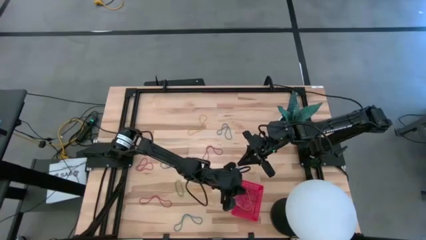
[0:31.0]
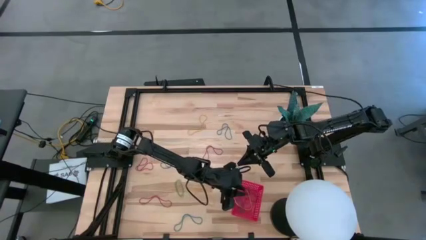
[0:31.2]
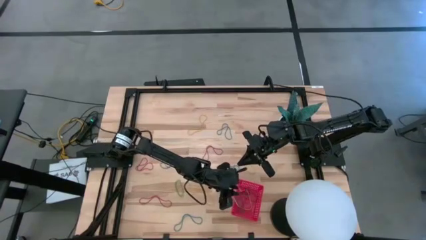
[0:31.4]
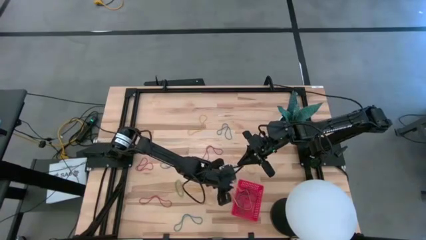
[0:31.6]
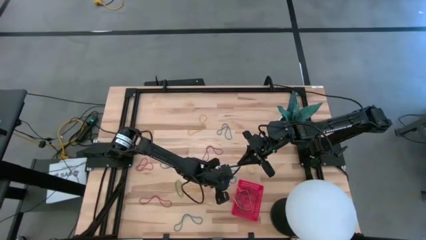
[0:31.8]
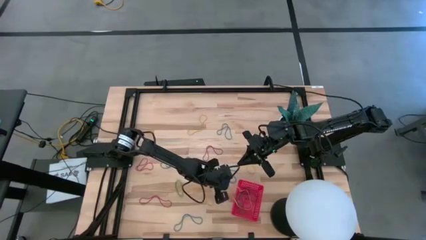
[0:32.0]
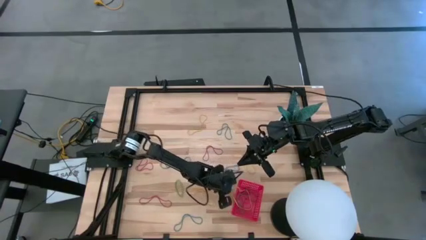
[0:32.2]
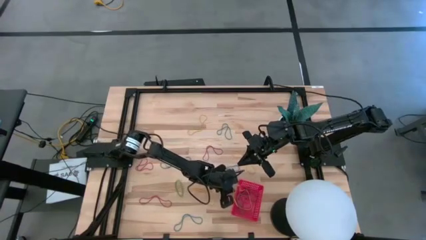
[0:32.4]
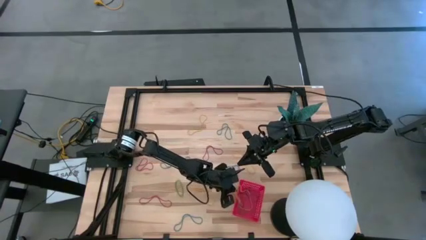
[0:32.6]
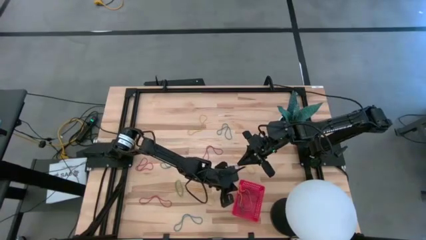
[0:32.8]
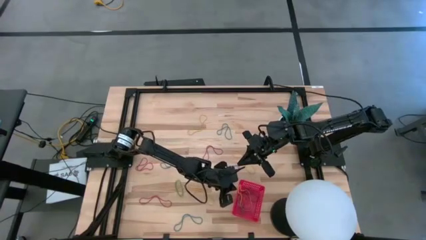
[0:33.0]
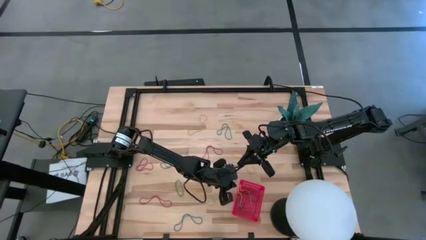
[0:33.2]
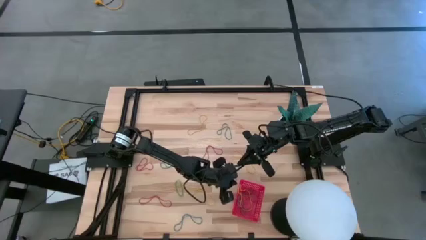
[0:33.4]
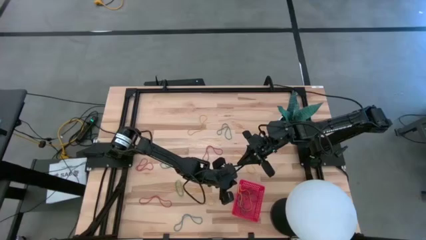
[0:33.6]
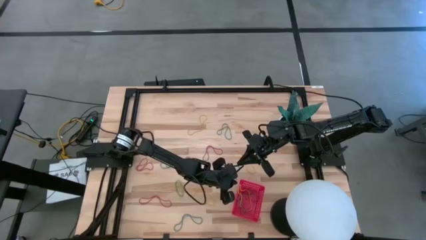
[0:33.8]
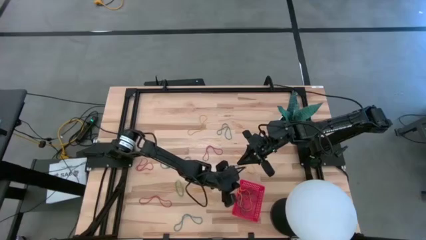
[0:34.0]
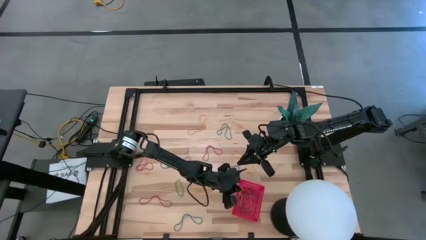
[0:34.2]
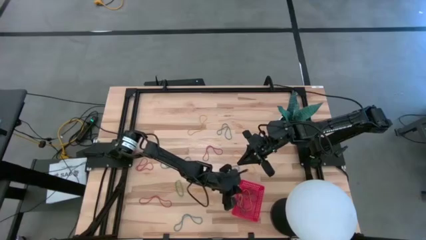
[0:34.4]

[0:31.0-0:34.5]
Task: Pick and place items into bin
Adjust the yellow rubber band in the red bin

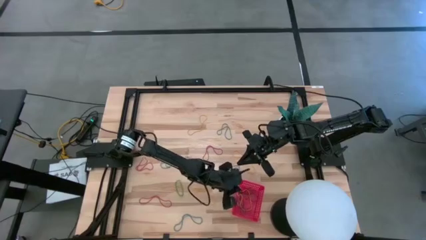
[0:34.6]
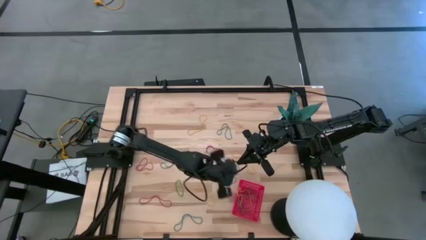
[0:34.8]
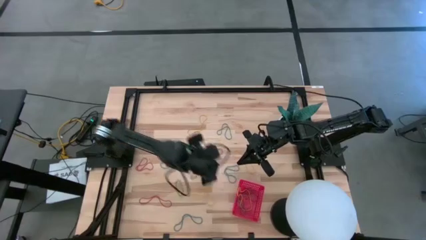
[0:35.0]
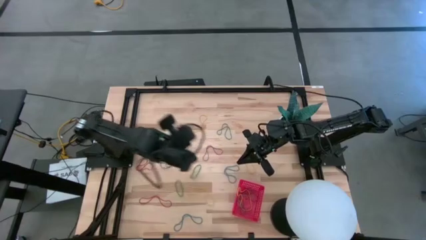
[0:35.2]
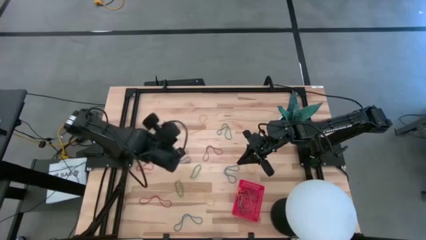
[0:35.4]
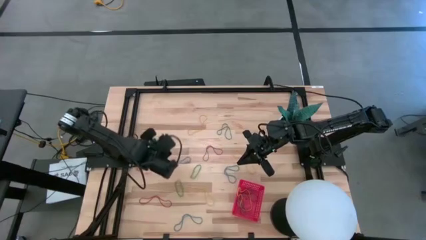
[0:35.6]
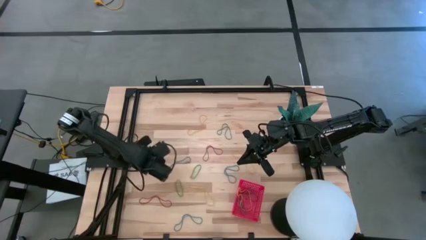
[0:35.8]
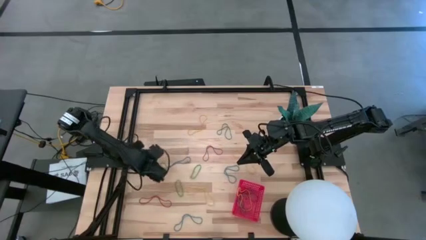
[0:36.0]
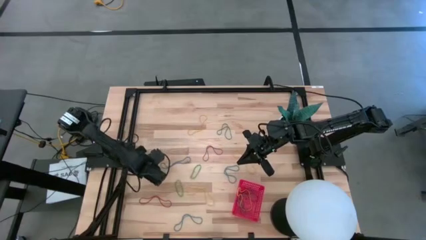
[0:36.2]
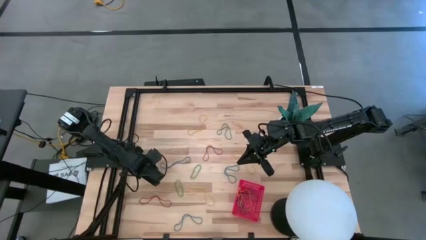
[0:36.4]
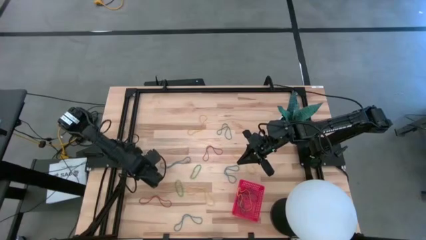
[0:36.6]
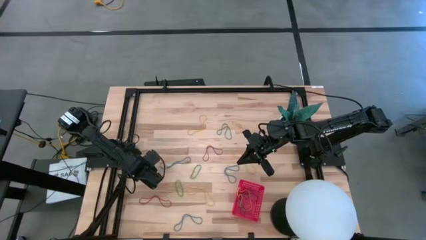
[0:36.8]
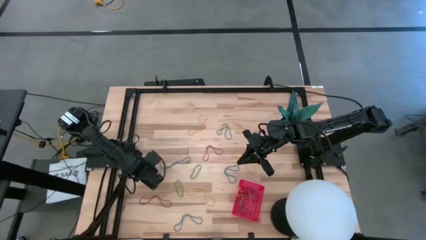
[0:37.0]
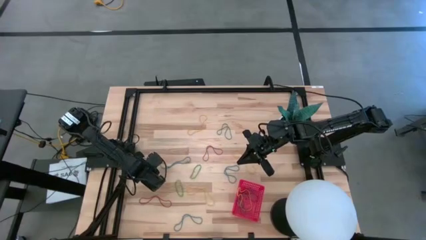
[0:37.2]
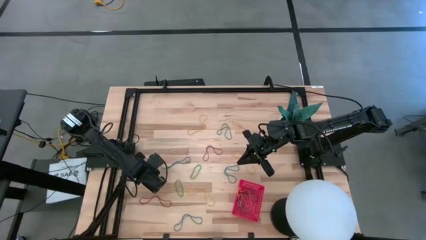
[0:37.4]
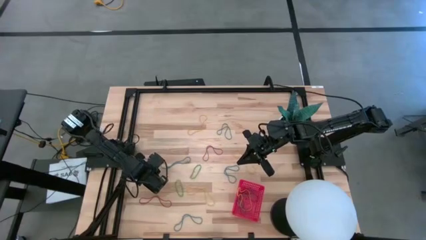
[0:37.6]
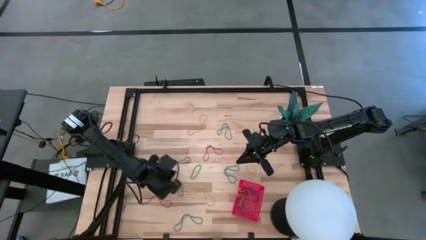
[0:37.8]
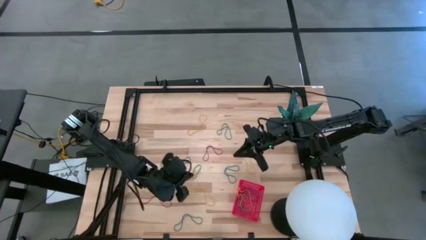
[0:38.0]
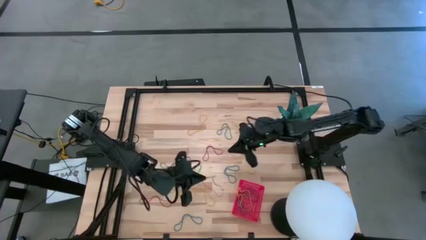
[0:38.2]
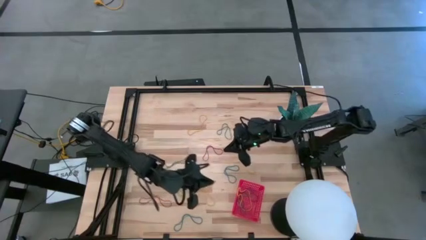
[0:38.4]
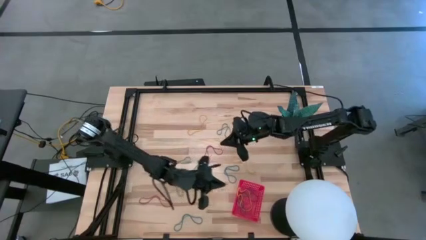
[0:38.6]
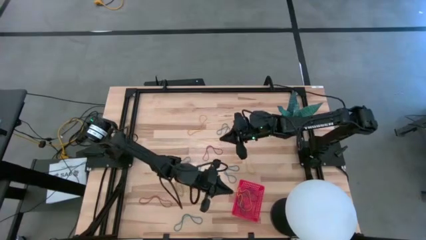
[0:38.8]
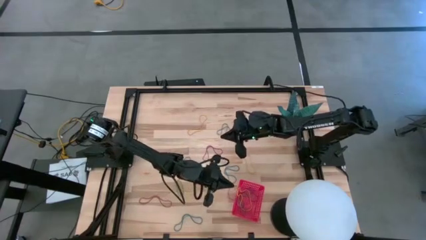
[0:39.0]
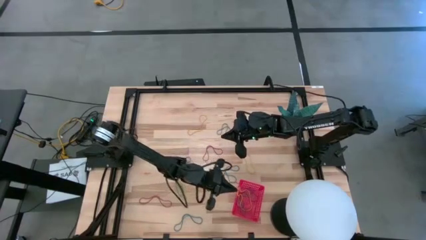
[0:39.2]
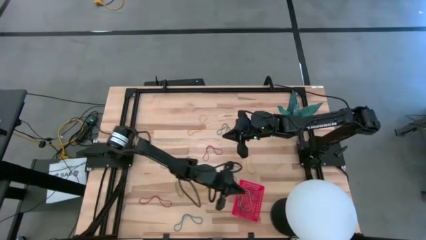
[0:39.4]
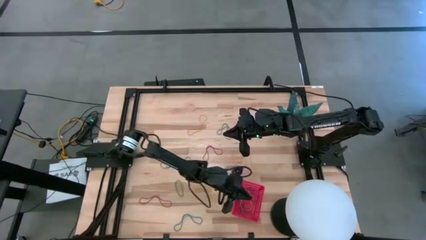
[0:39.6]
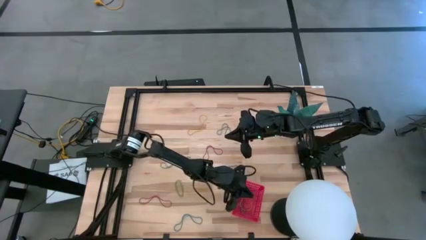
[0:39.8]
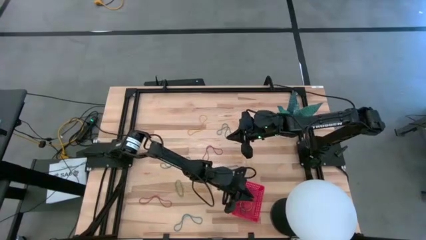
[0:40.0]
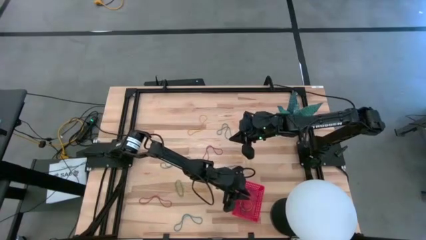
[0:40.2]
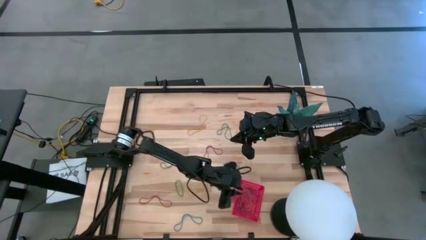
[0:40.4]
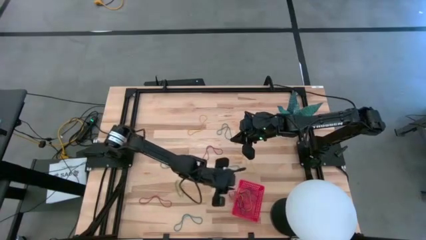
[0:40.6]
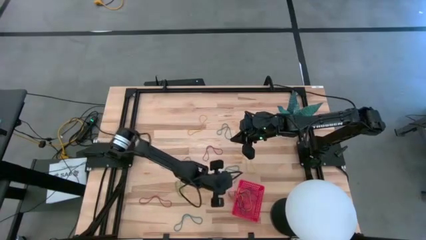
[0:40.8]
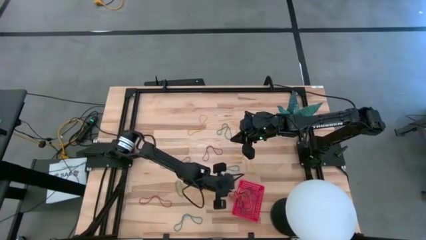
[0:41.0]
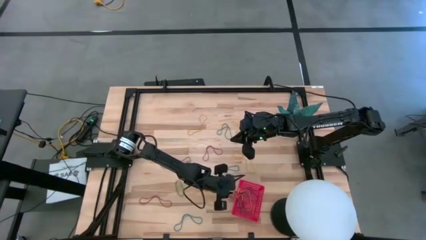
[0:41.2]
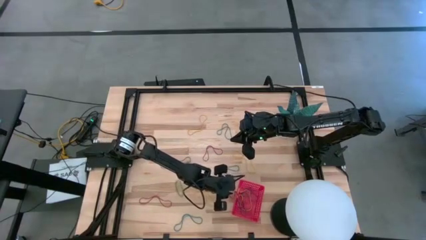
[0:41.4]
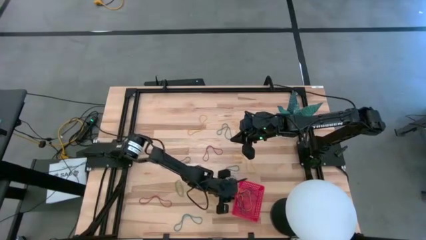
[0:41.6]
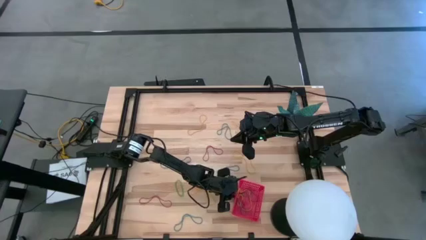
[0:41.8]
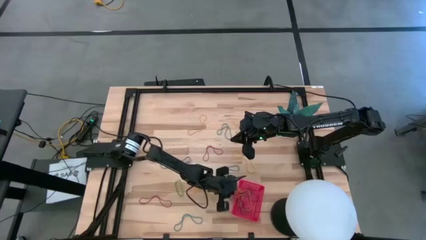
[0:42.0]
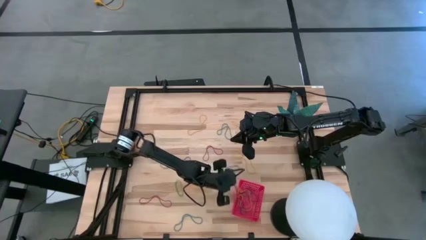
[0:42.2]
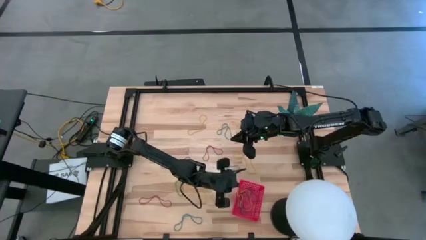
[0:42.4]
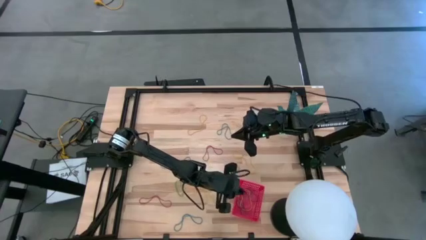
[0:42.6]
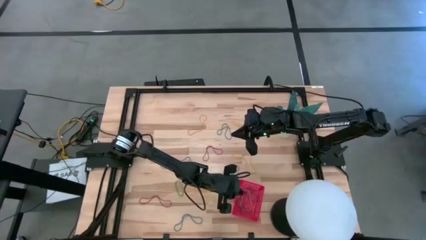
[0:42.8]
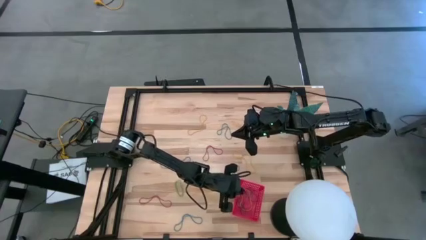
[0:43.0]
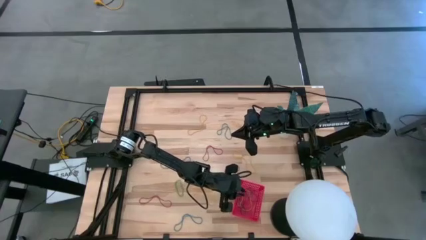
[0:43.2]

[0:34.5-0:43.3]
Put the red rubber band into the red bin

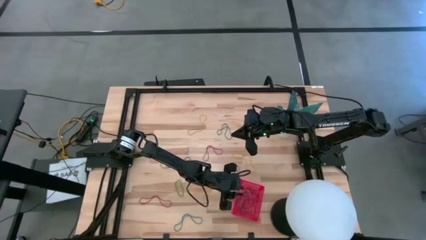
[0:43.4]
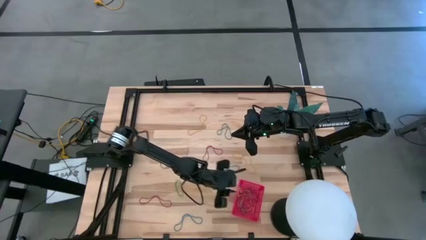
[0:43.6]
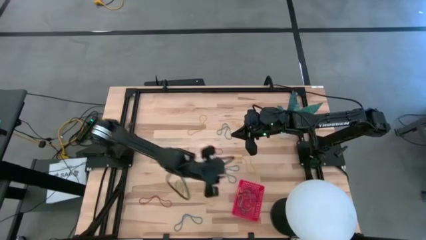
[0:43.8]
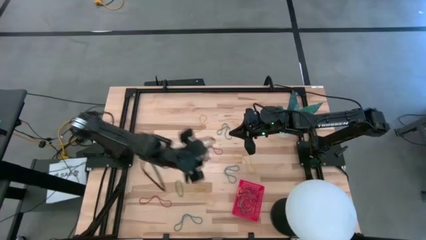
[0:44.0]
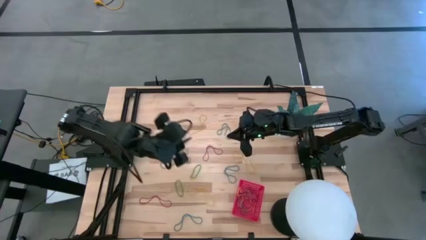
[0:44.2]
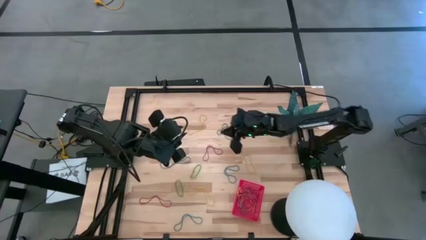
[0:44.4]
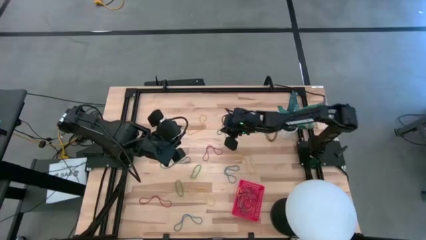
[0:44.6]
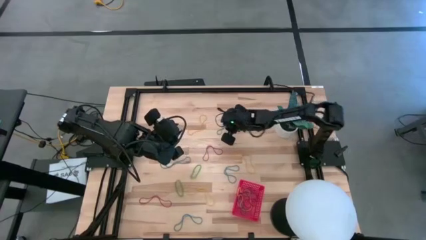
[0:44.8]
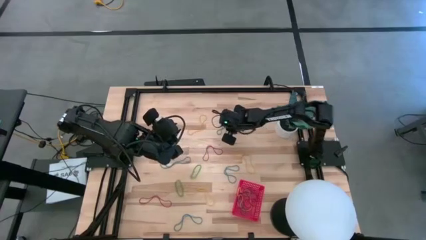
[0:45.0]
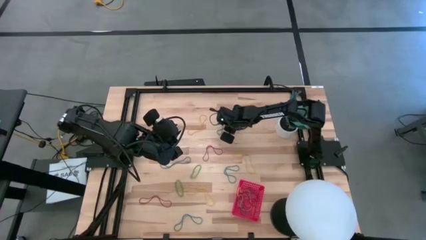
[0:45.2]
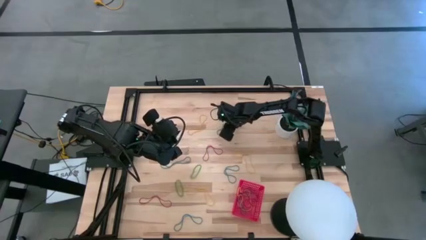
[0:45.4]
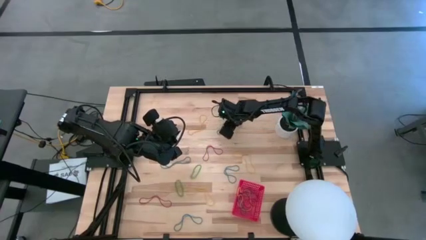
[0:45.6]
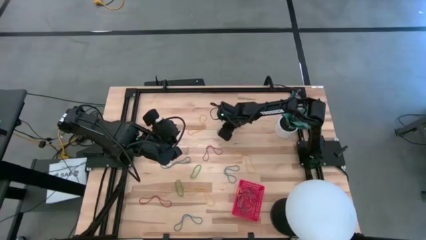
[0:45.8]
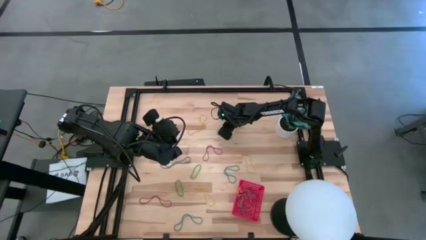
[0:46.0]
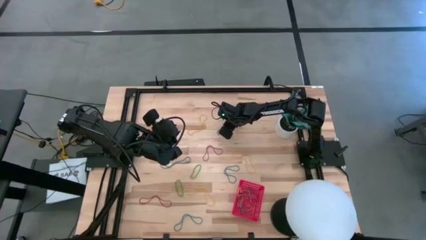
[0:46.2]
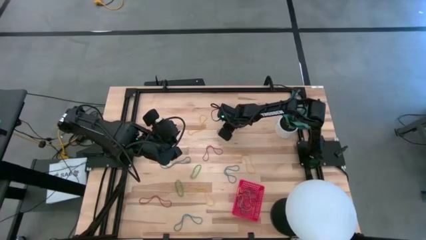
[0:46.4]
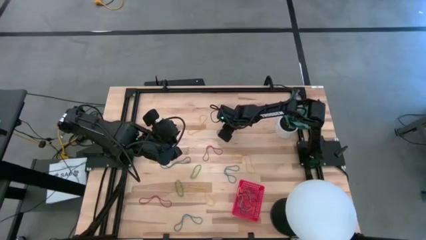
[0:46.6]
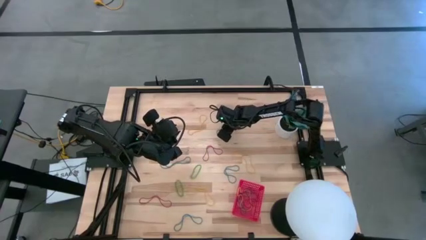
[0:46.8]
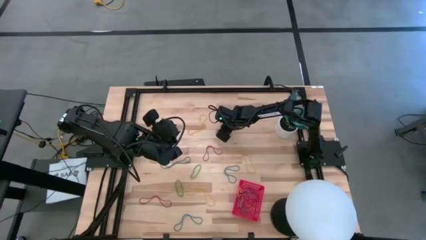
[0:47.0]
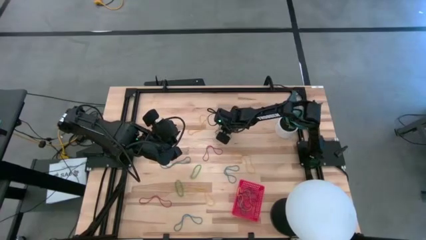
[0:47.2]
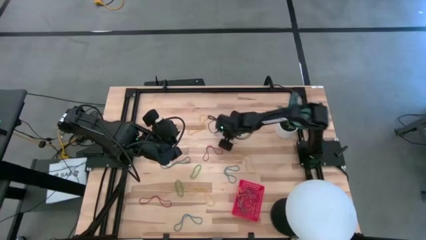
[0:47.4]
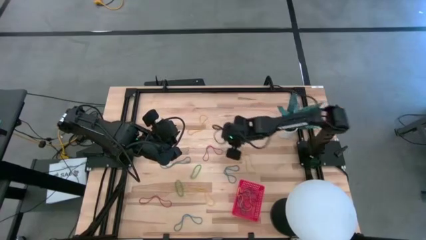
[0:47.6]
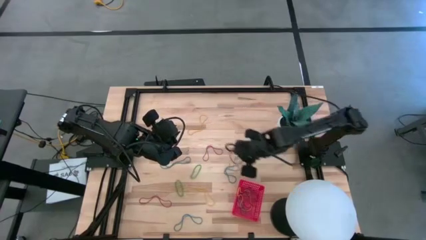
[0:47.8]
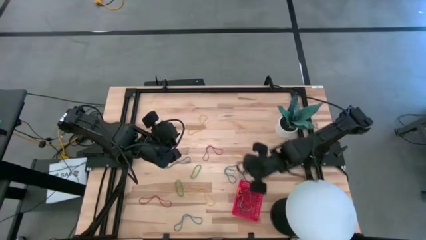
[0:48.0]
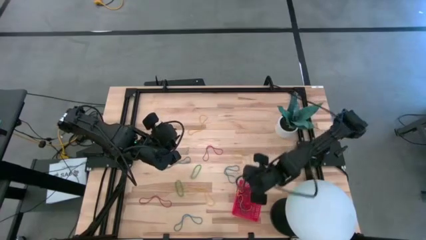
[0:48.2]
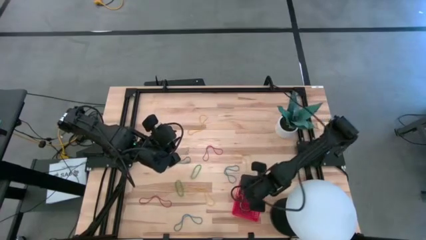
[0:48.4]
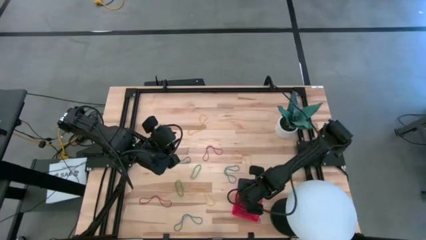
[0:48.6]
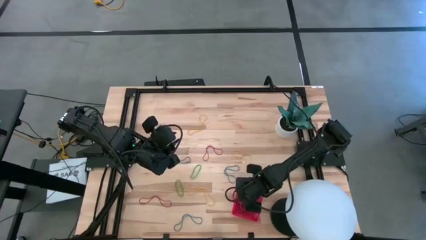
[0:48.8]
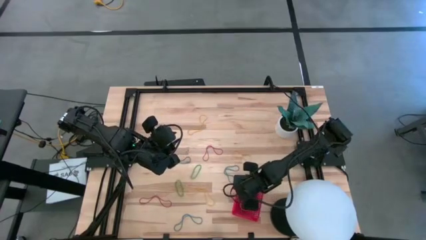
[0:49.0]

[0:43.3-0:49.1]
Put the blue rubber band into the red bin
